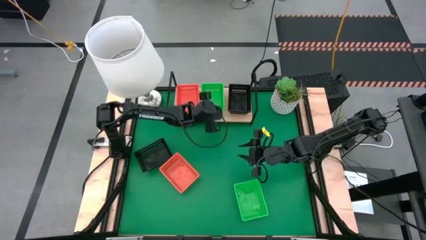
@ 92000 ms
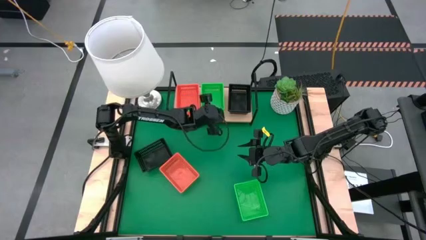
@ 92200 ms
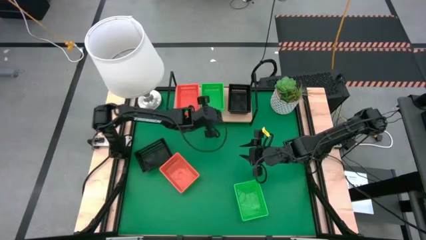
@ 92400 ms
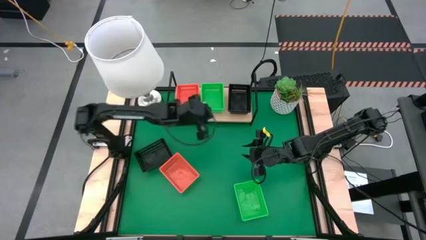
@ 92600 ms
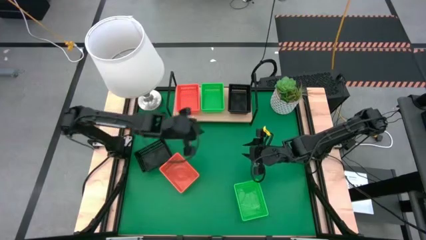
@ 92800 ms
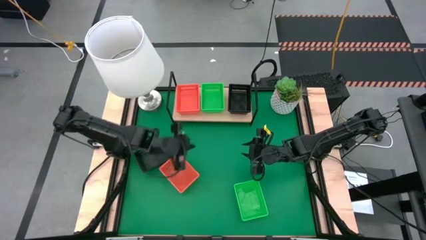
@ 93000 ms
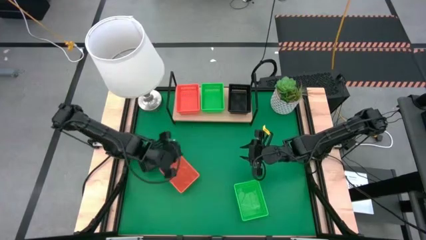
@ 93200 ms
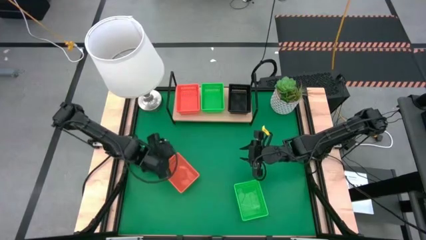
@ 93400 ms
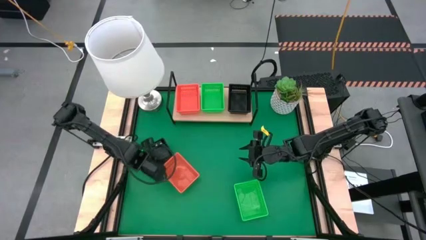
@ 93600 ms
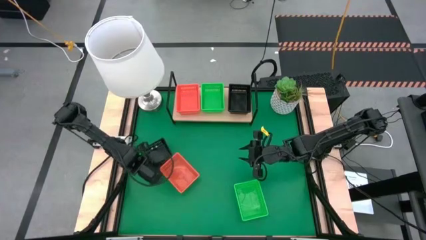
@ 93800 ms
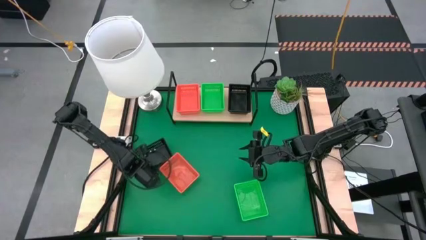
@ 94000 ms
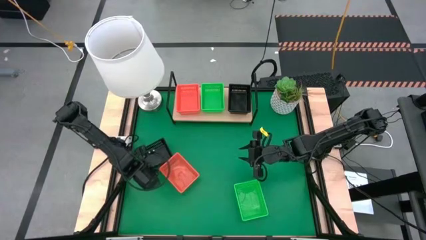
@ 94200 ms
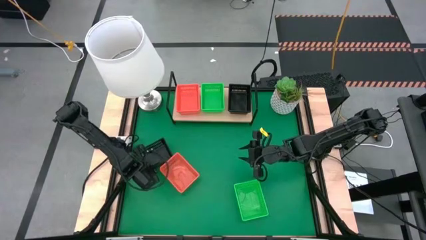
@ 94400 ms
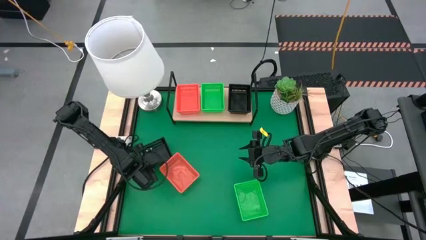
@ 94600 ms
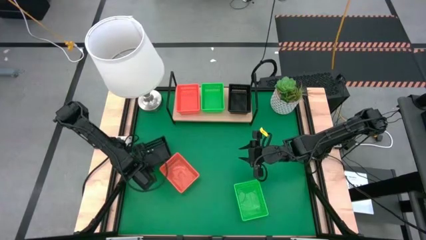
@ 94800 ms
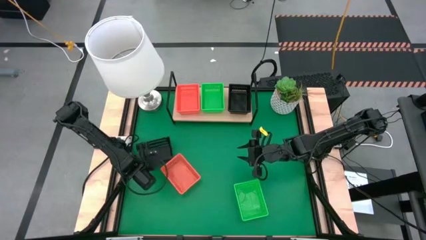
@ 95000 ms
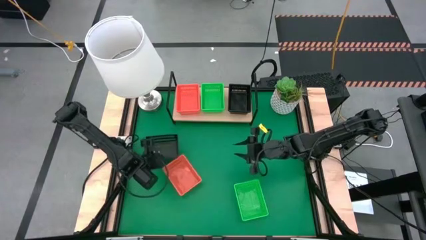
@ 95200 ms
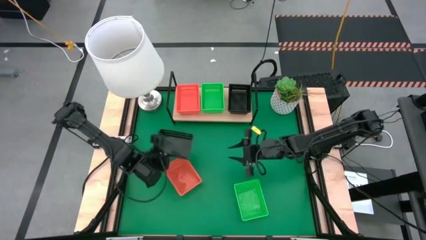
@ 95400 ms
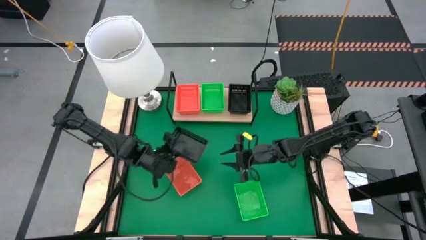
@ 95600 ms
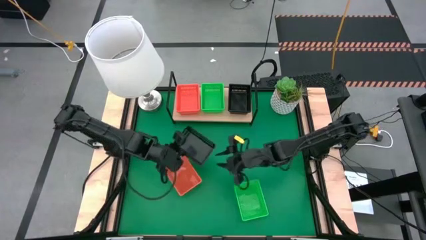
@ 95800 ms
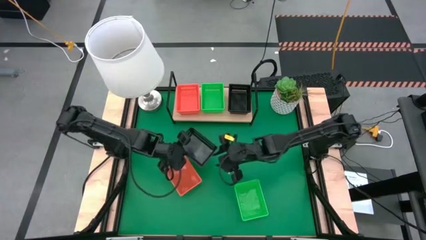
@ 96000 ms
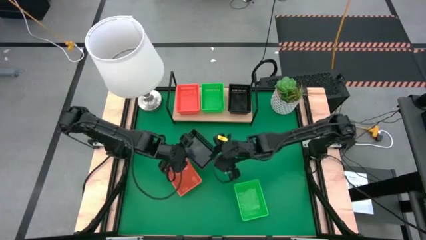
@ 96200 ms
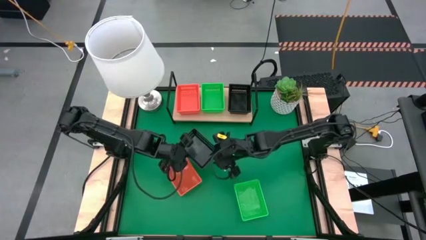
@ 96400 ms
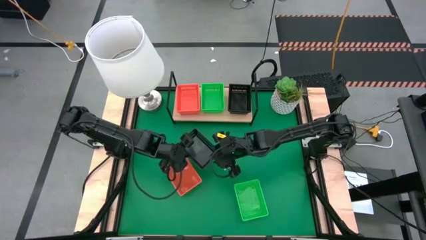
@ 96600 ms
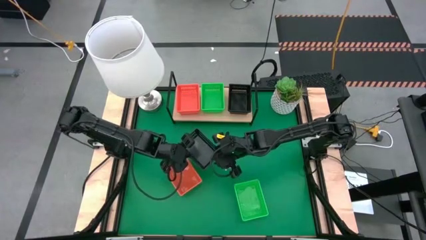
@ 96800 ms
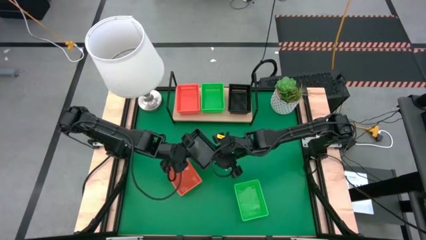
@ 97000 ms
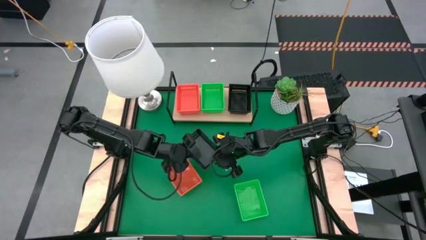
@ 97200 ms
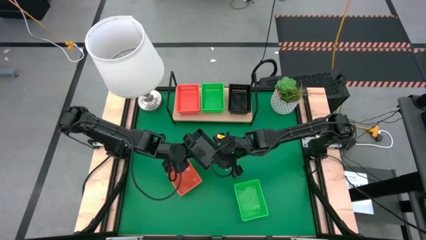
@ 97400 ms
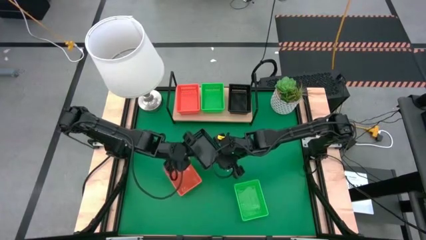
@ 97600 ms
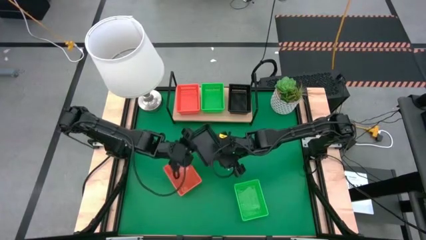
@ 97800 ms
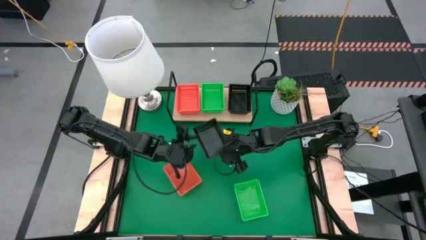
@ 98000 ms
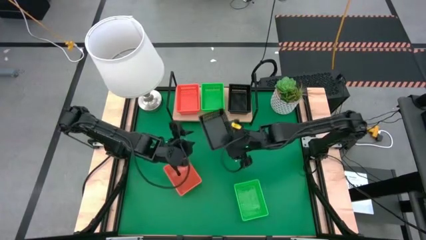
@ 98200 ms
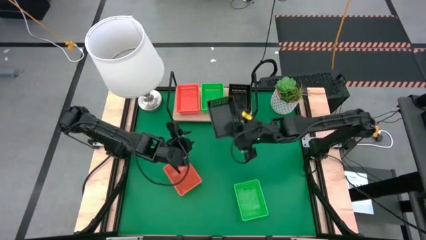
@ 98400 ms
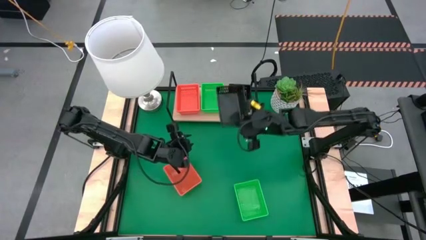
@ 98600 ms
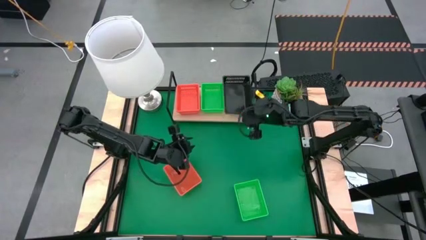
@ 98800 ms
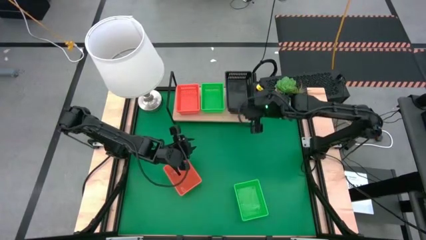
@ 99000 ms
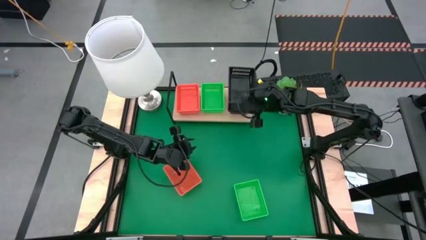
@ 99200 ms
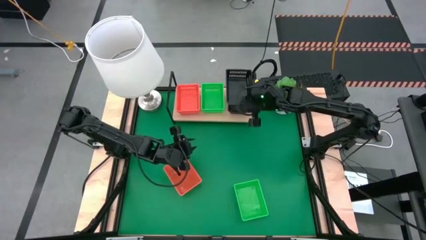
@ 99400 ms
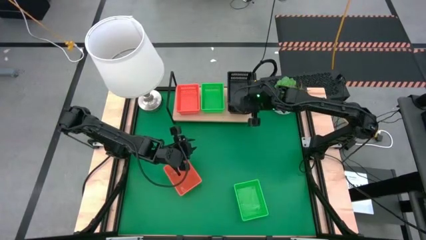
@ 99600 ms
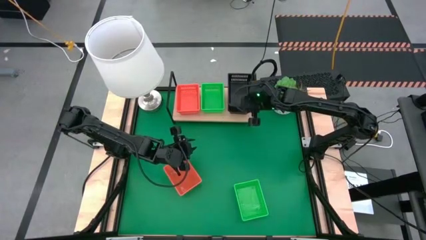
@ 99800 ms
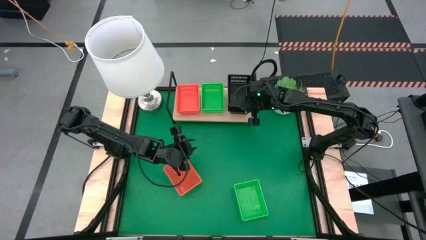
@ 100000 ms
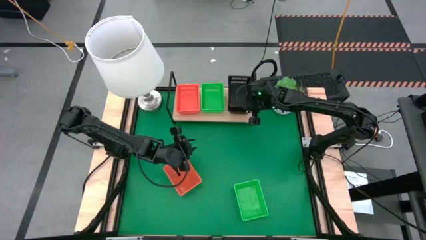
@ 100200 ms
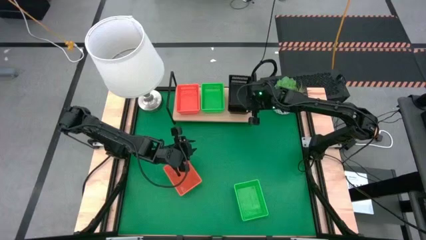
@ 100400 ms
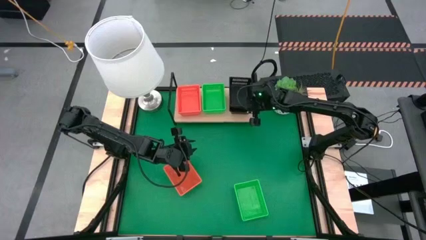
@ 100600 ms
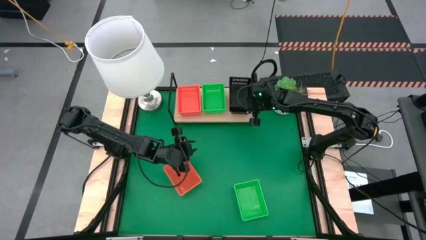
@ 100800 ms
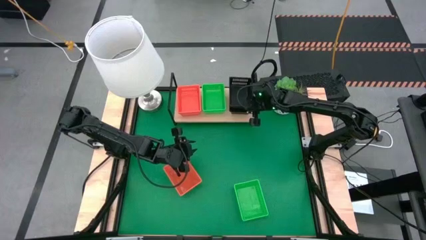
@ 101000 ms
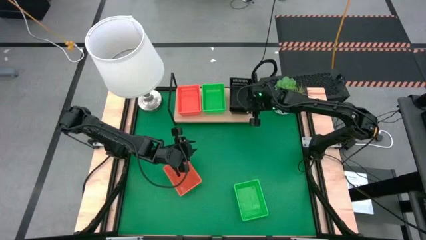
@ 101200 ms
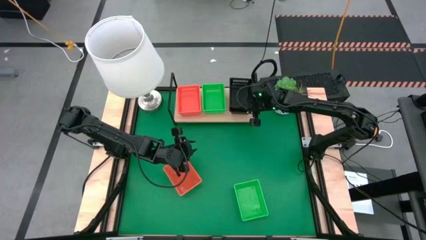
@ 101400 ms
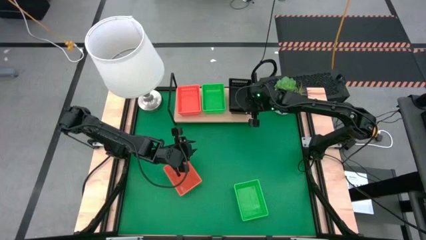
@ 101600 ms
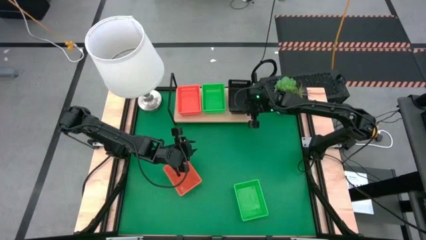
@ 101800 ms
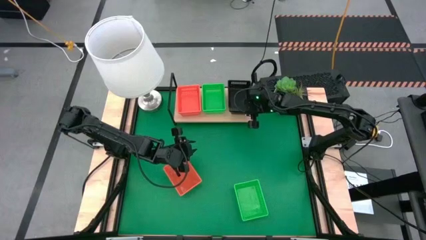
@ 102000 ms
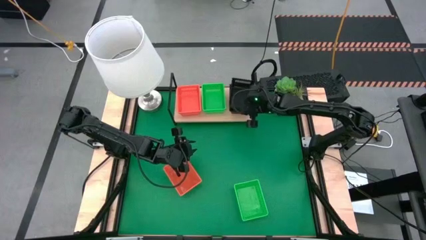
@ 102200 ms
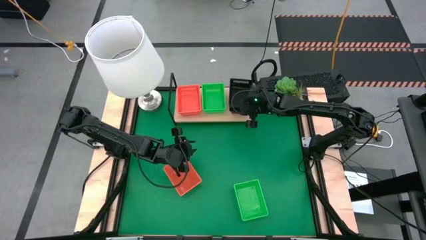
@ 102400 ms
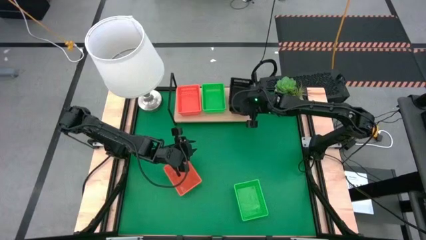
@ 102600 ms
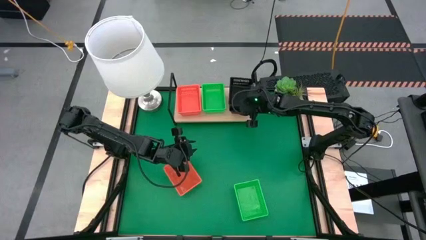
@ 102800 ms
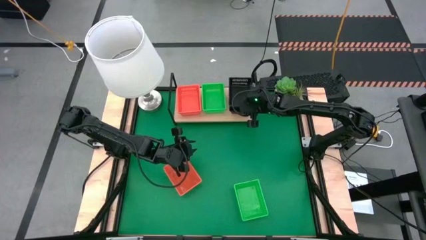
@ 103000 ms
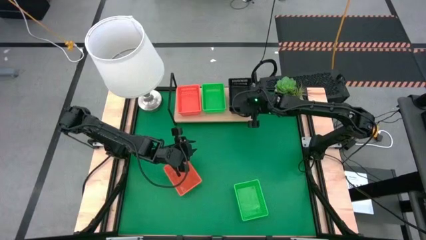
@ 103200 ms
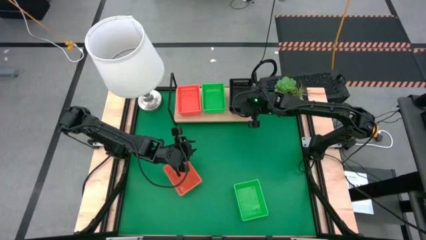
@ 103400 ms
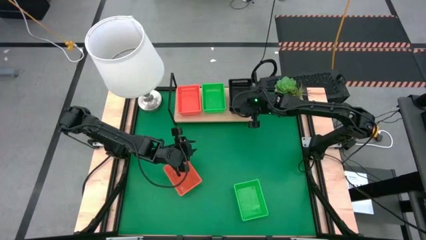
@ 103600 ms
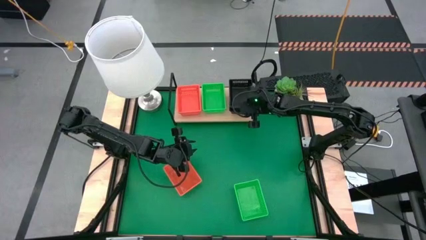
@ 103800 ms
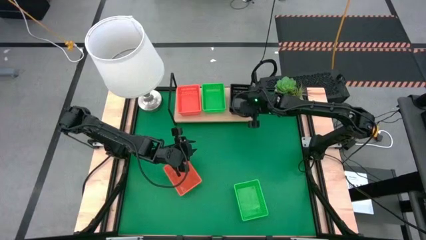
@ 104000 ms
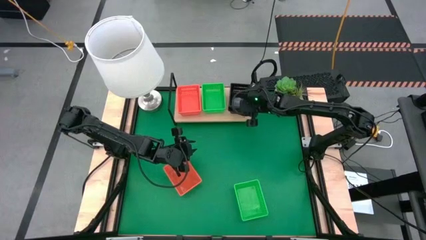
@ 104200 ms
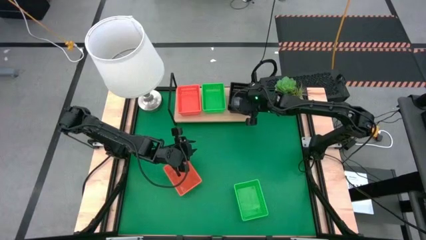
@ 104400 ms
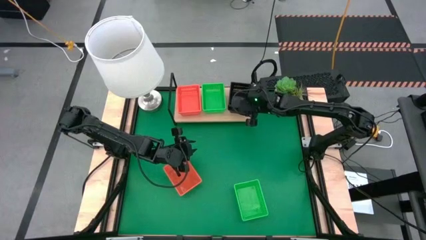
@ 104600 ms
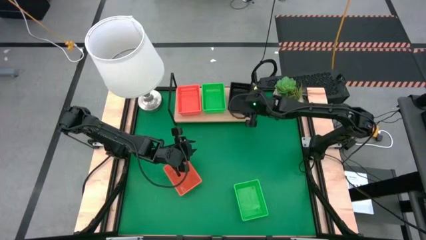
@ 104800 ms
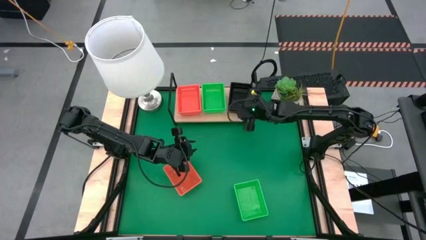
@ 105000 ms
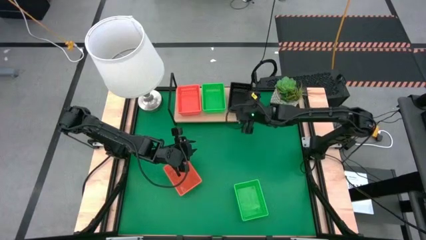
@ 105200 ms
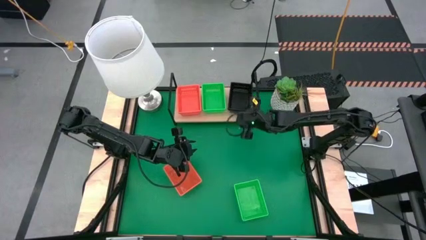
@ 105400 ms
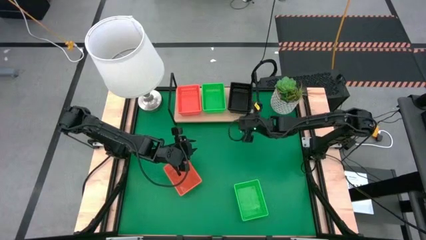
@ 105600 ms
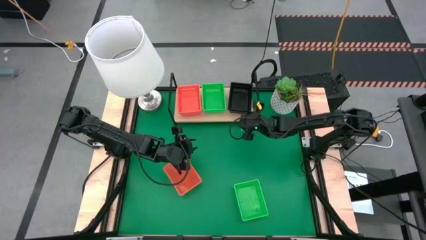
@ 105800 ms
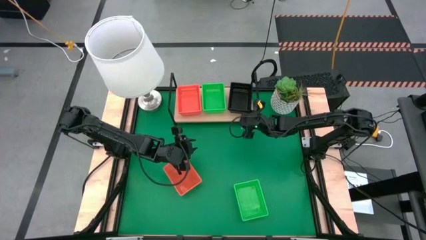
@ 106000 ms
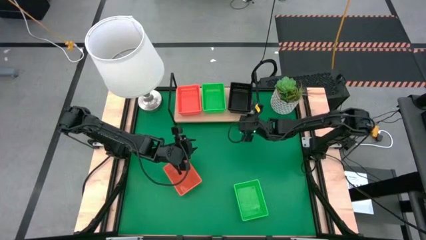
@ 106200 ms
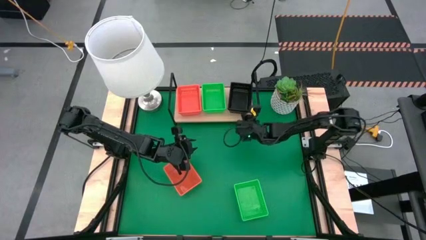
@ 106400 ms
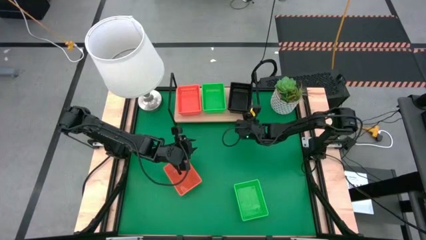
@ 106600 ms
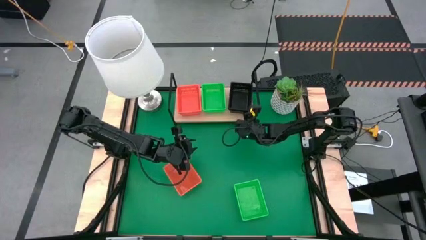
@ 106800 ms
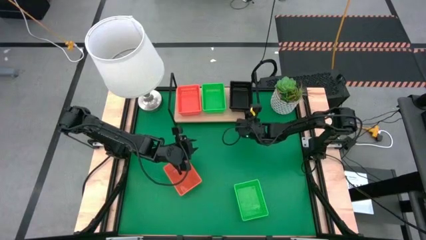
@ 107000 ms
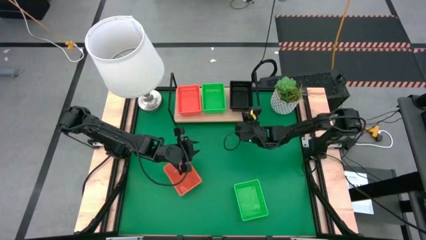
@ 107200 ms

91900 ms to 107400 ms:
Task: Stack baskets on shelf by color
Stack the black bin on the black bin on the shelf
